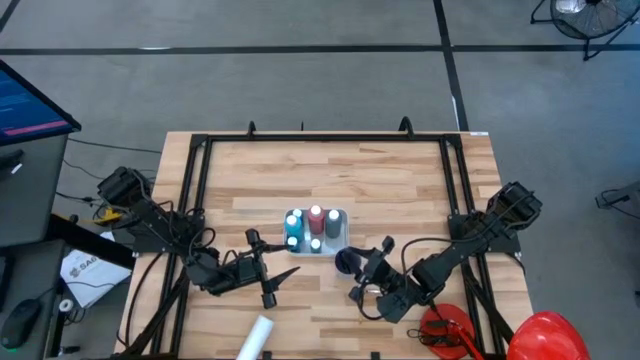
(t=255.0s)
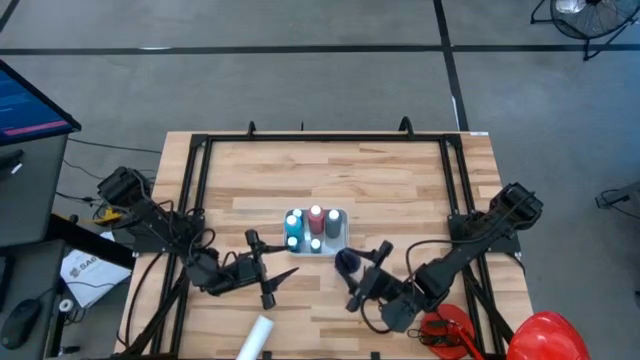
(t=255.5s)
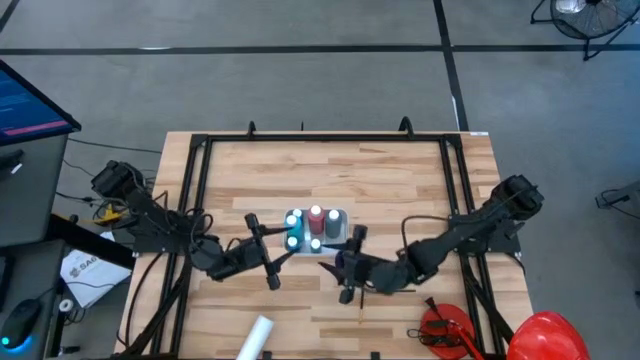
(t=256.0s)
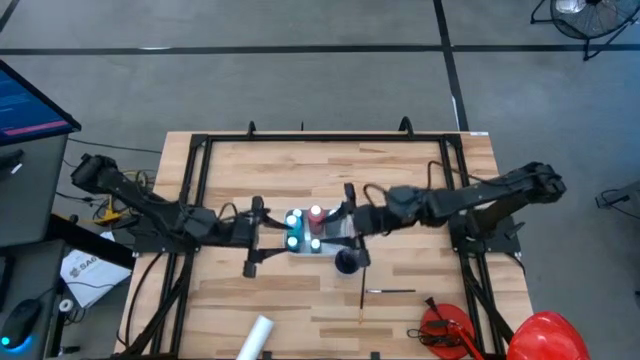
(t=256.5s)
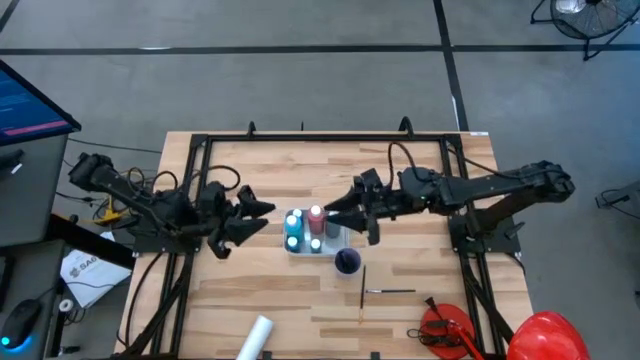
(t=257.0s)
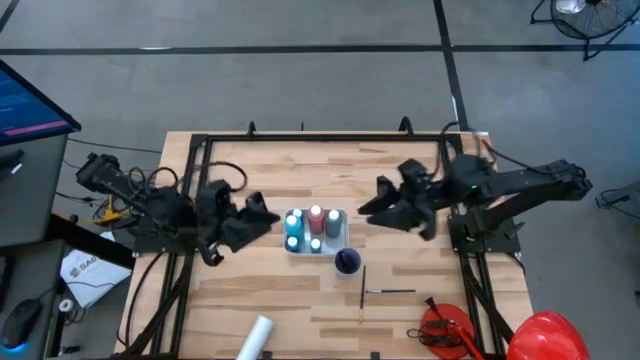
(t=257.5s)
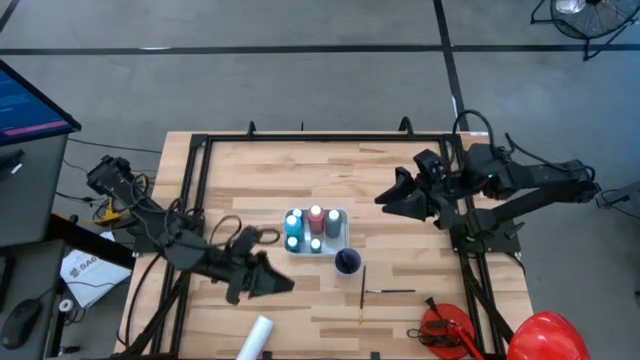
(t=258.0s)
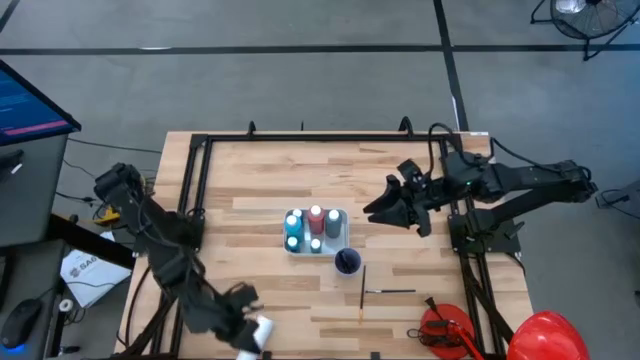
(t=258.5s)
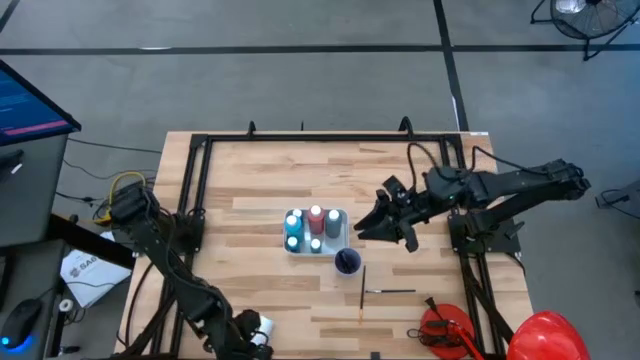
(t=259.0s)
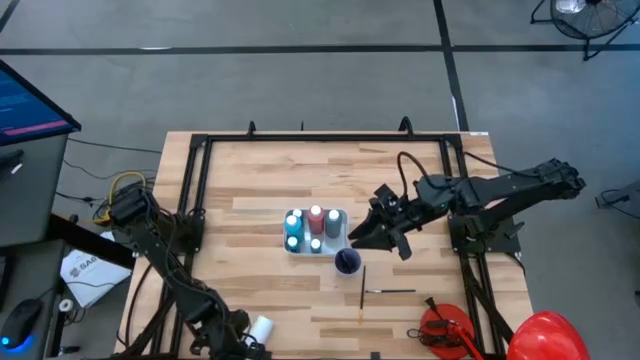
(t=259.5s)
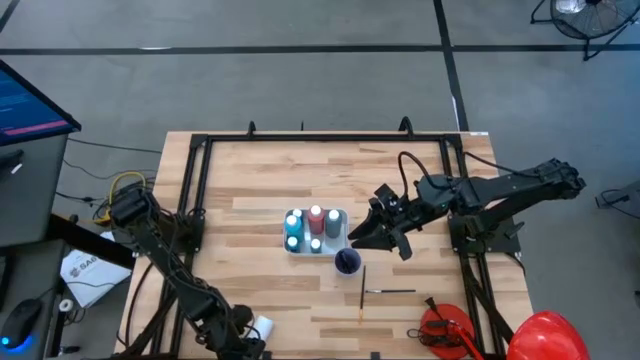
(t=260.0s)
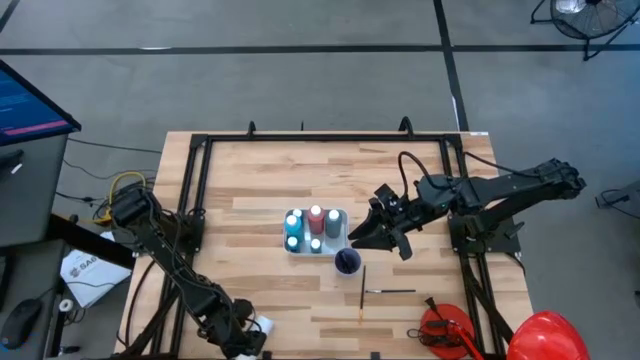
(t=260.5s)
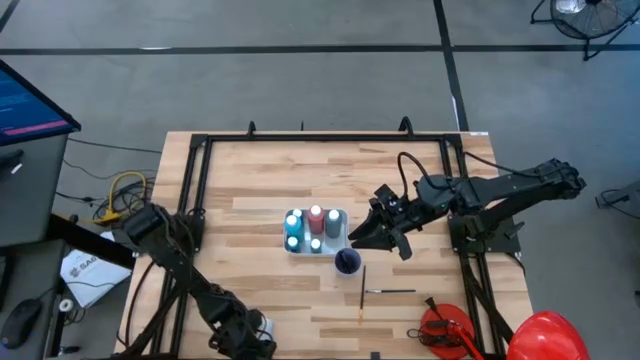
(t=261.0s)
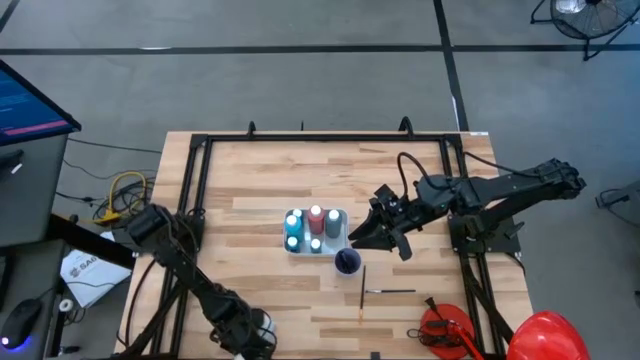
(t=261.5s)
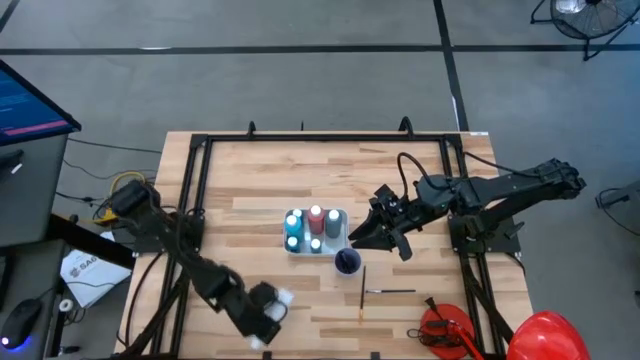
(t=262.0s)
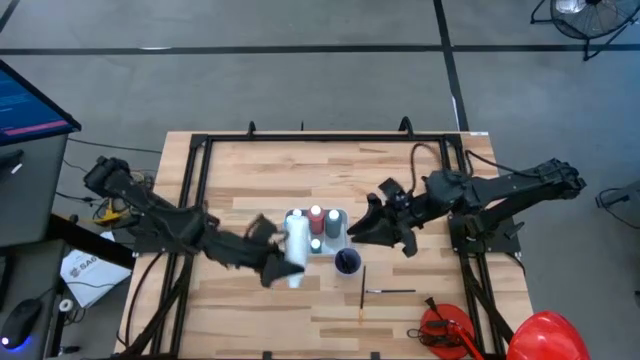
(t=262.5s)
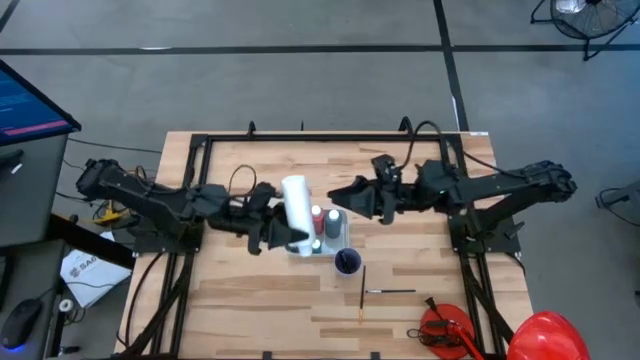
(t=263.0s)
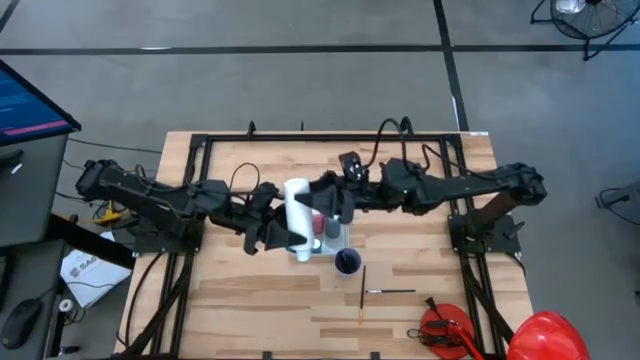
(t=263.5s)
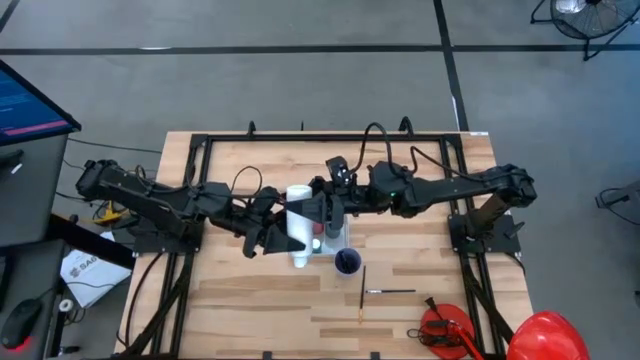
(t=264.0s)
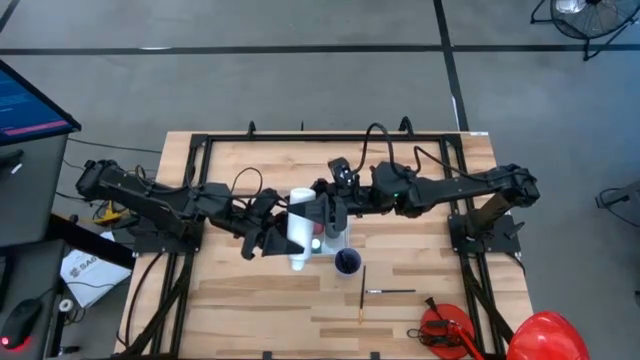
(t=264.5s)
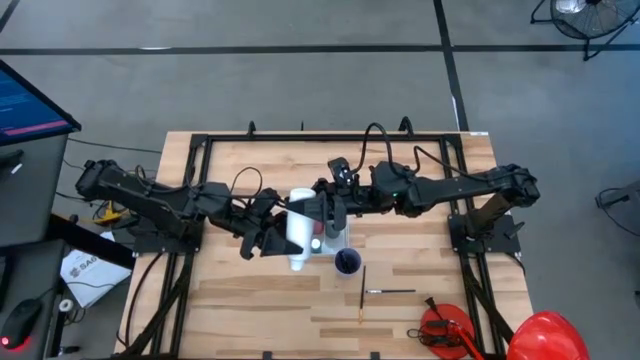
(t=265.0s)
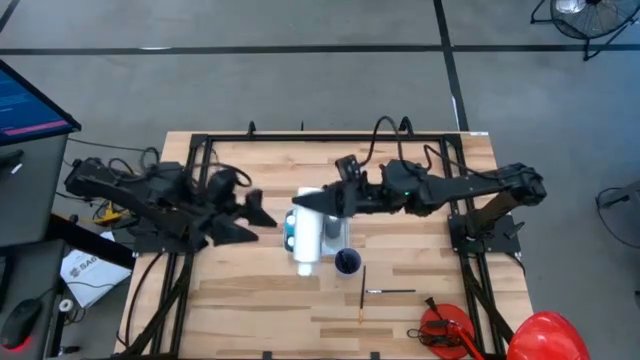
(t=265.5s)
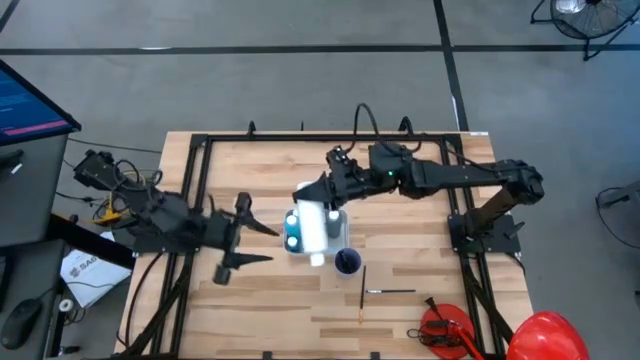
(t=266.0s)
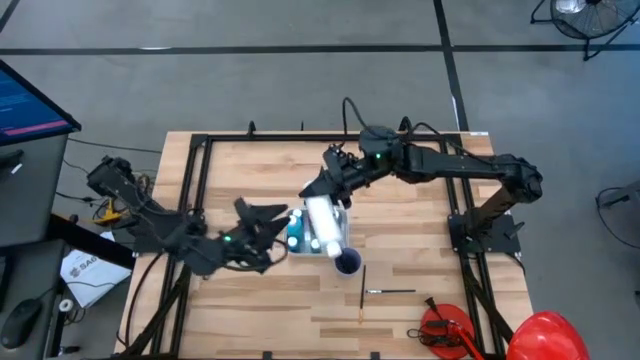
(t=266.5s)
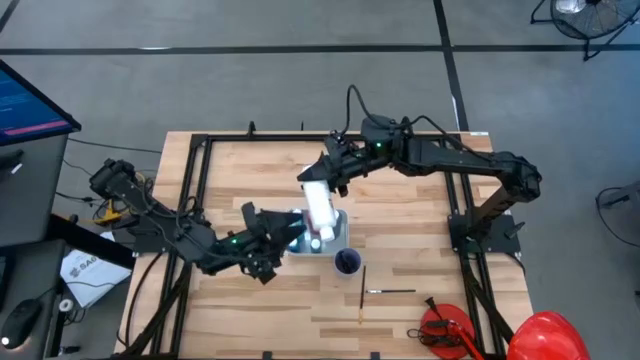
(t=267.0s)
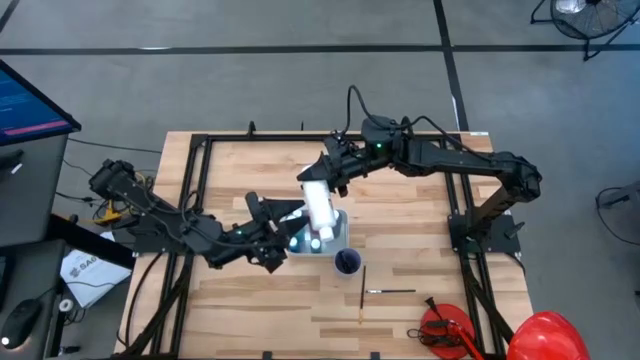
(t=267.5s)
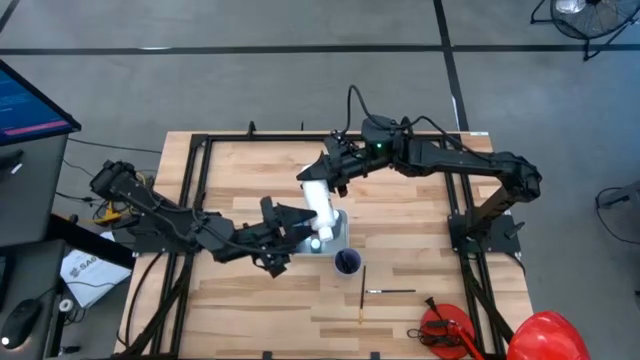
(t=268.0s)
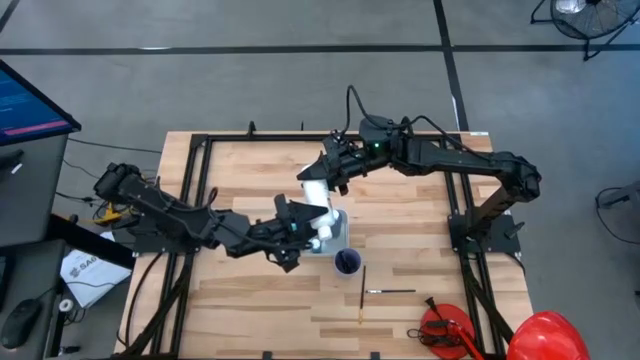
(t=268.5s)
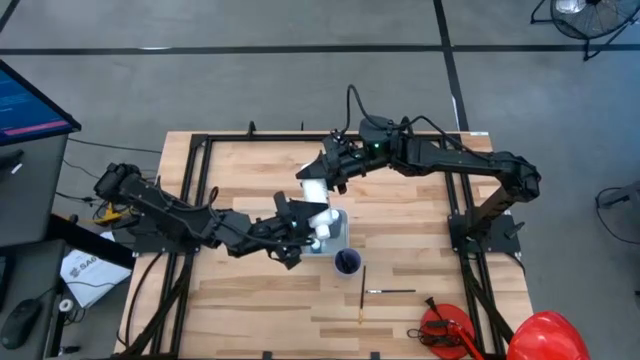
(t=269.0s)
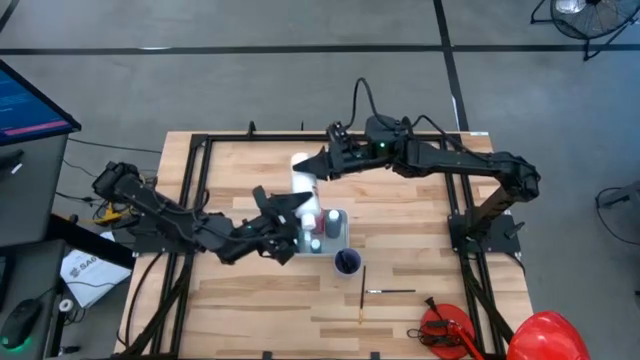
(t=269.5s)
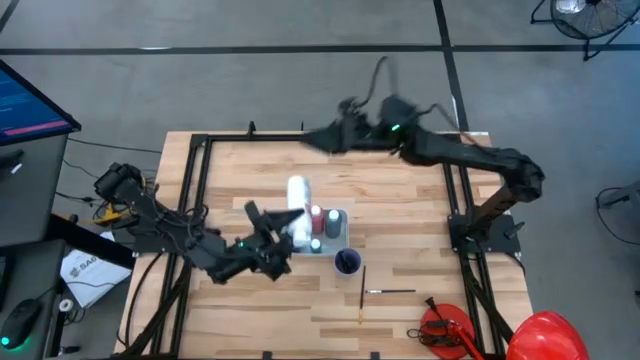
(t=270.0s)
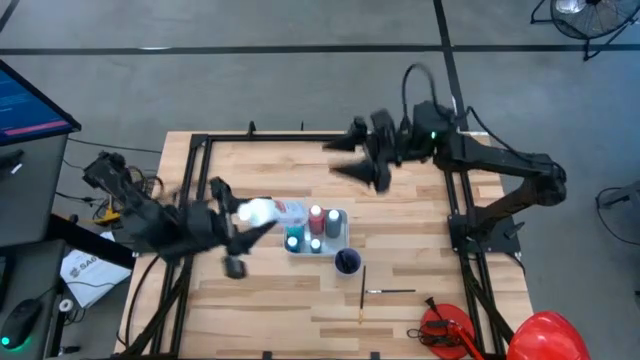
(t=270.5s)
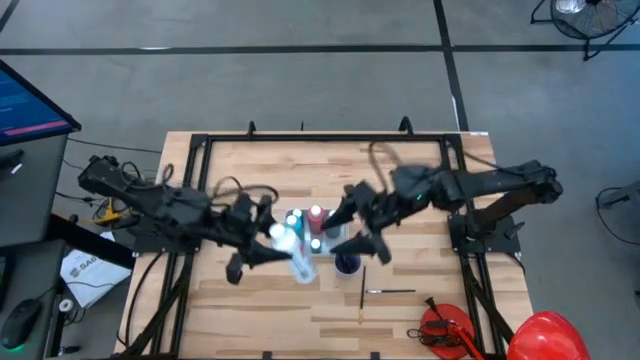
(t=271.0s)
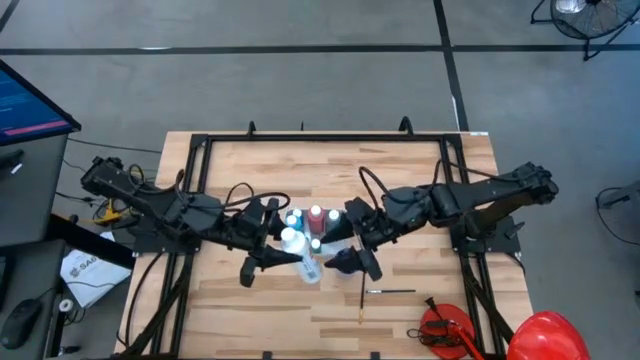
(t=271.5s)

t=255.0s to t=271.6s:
Task: Pick & Place Paint Supplies
Put the white paint bottle into the white bin

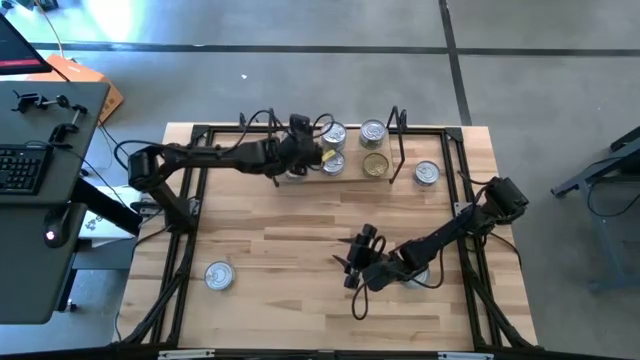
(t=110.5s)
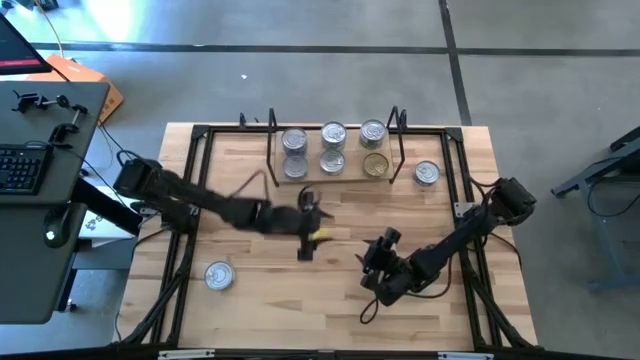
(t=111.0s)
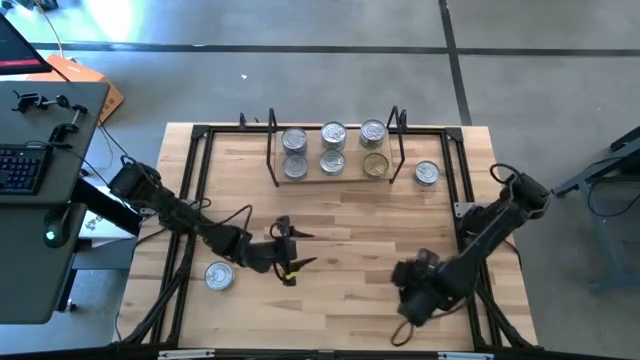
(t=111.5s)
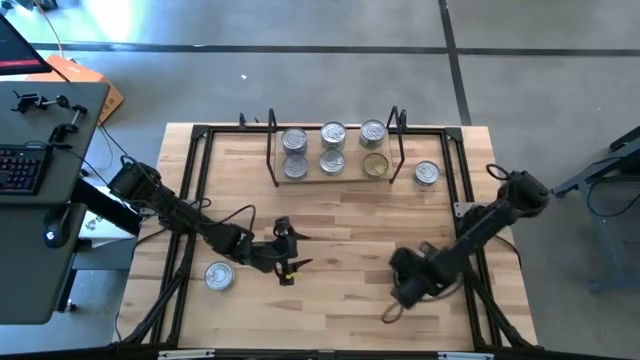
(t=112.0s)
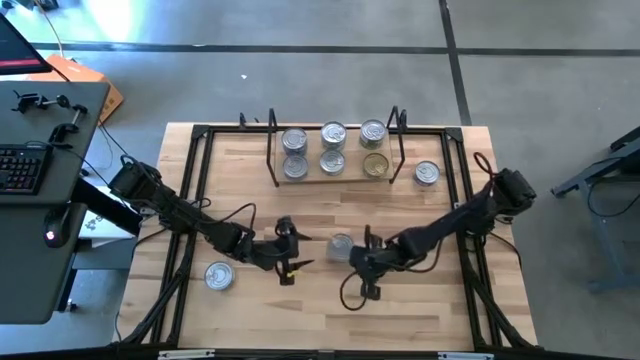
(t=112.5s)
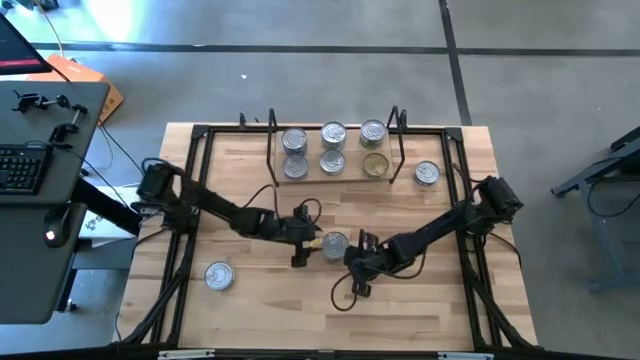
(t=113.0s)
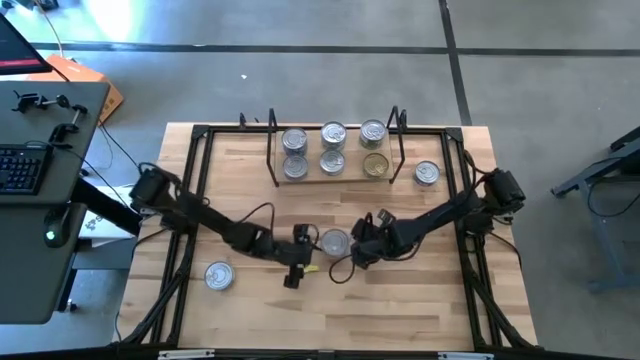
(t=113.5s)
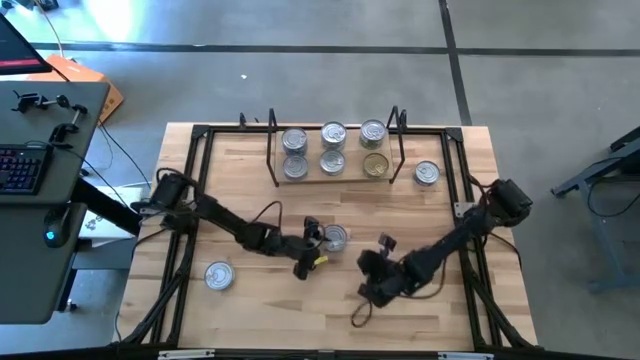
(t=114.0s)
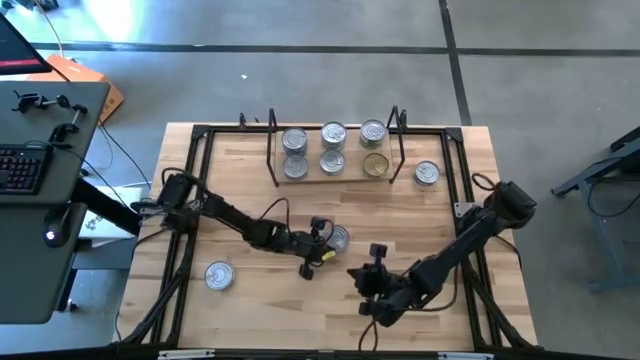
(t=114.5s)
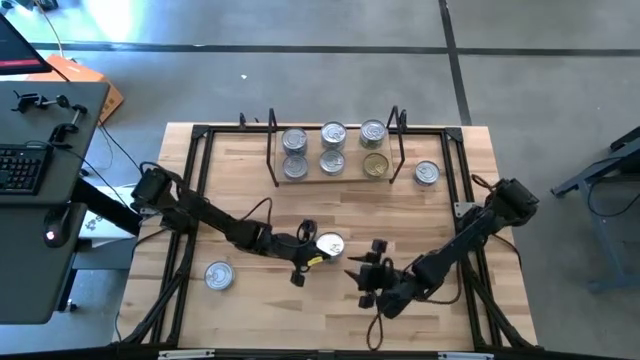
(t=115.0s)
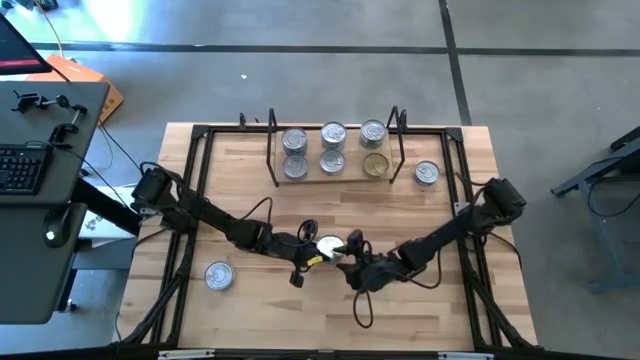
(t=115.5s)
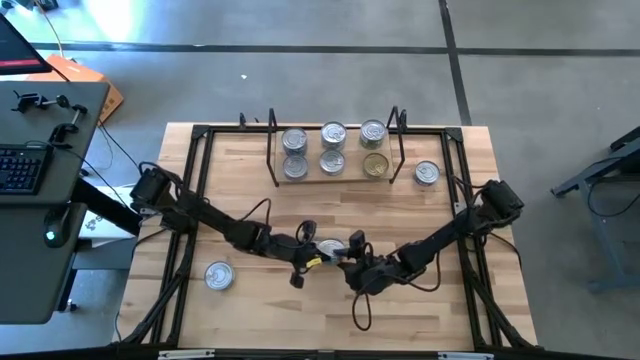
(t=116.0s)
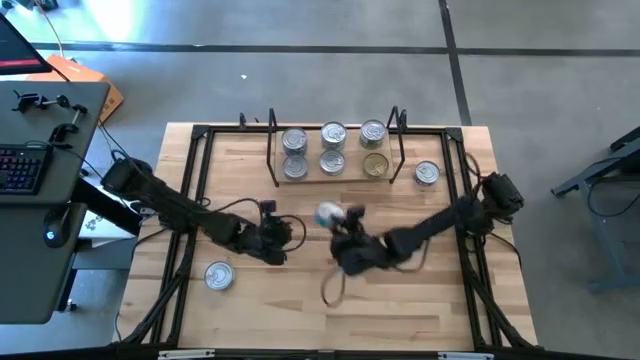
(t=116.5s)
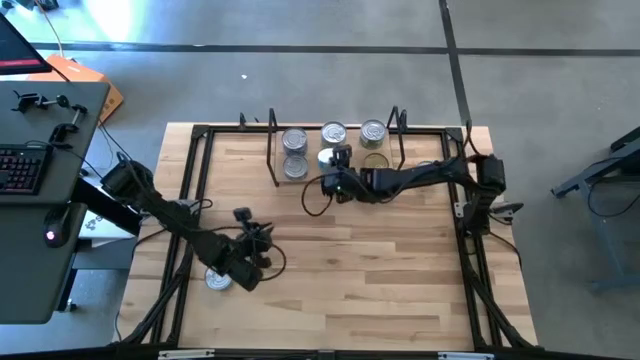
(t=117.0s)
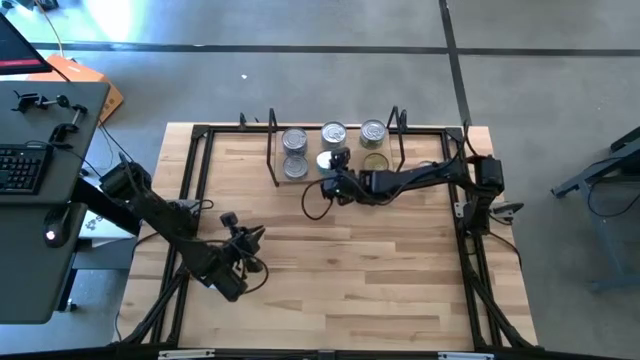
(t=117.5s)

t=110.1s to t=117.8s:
Task: Stack canned seafood by type on shelf
Stack the light blue tuna can on top of the light blue tuna can on the shelf
